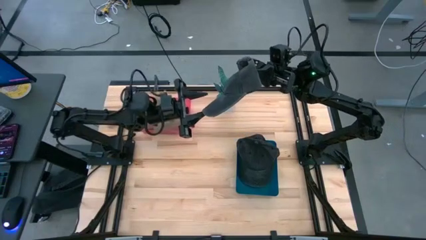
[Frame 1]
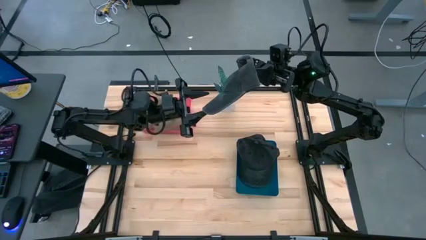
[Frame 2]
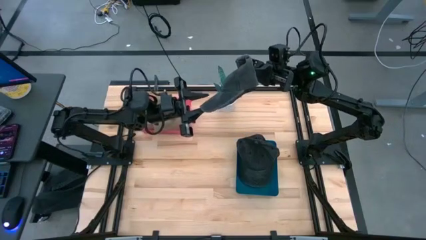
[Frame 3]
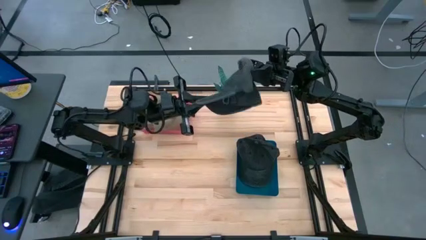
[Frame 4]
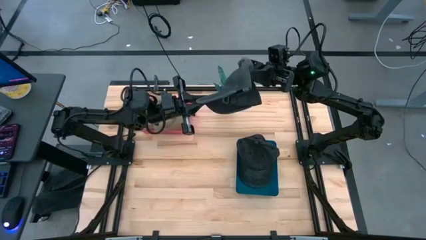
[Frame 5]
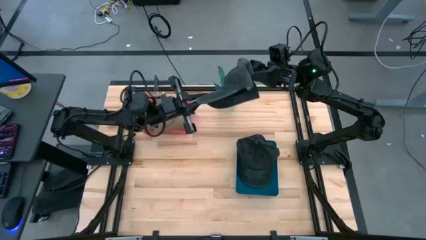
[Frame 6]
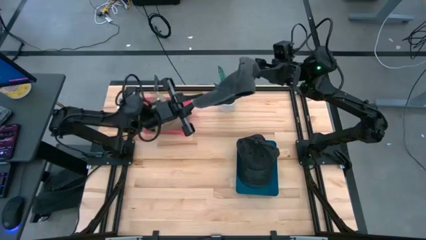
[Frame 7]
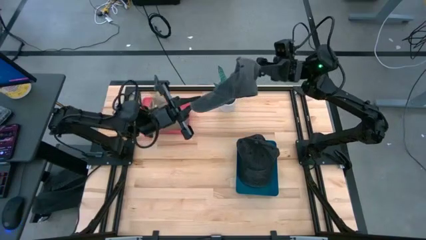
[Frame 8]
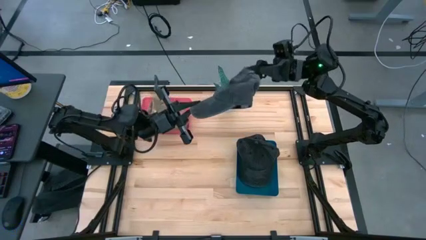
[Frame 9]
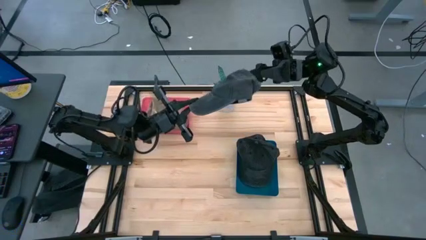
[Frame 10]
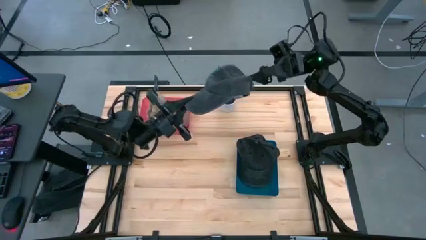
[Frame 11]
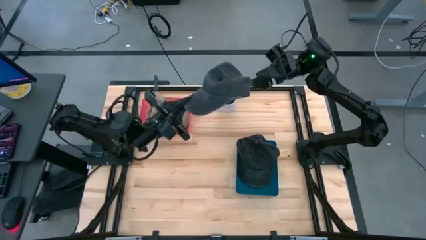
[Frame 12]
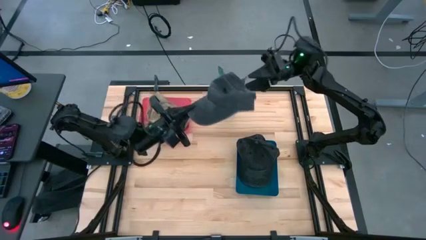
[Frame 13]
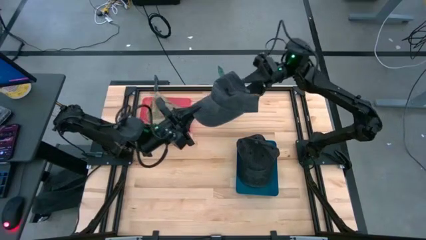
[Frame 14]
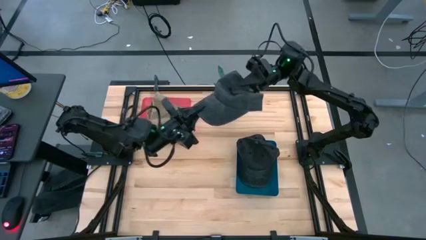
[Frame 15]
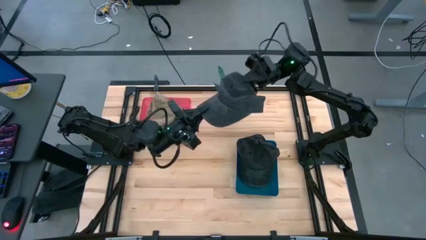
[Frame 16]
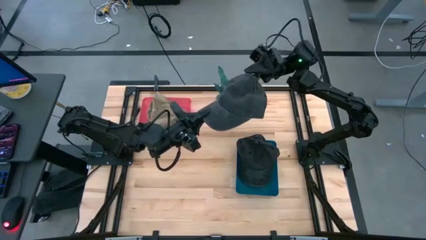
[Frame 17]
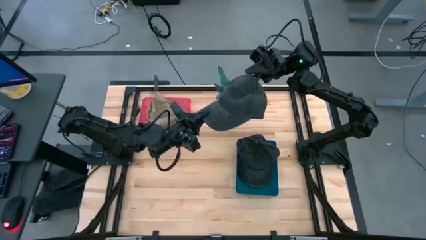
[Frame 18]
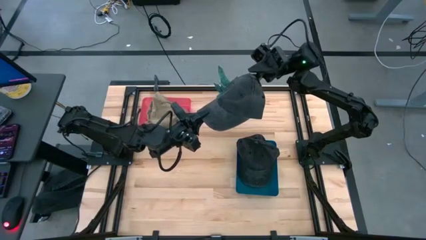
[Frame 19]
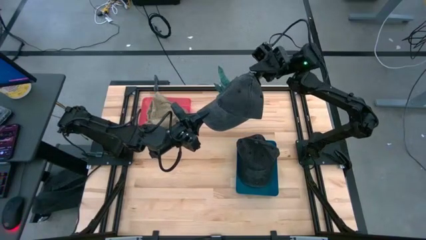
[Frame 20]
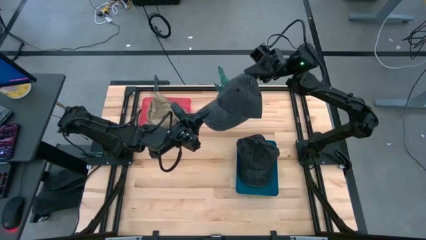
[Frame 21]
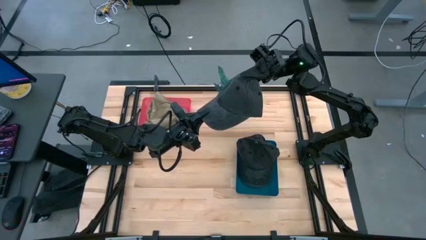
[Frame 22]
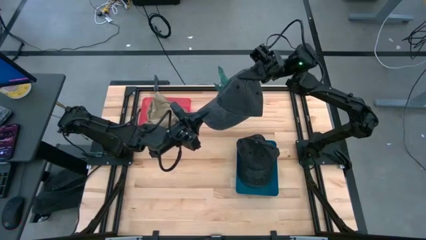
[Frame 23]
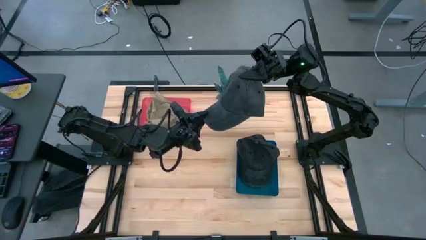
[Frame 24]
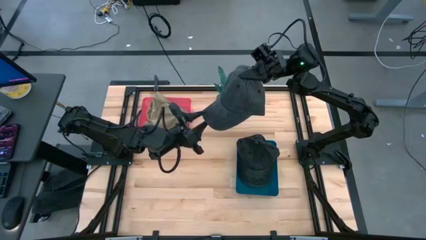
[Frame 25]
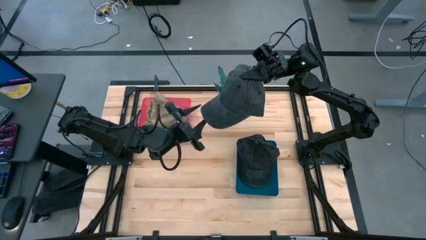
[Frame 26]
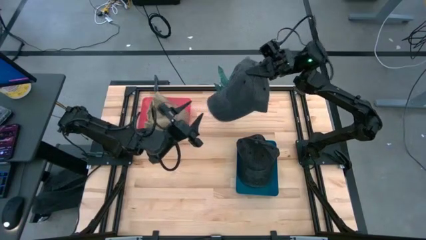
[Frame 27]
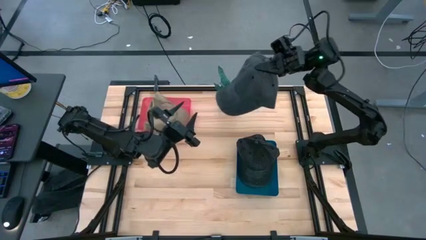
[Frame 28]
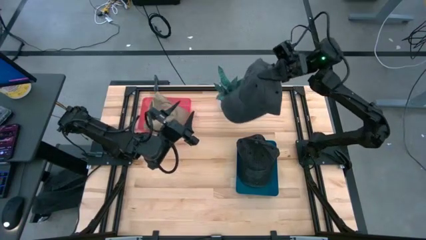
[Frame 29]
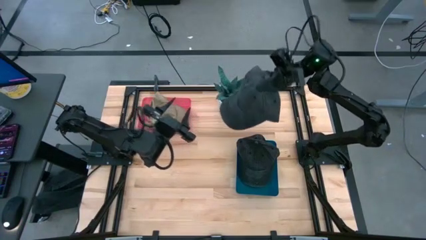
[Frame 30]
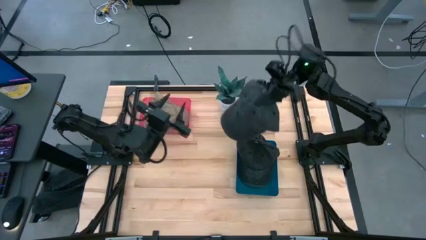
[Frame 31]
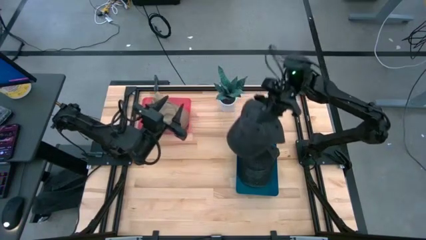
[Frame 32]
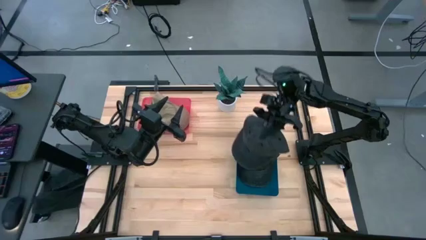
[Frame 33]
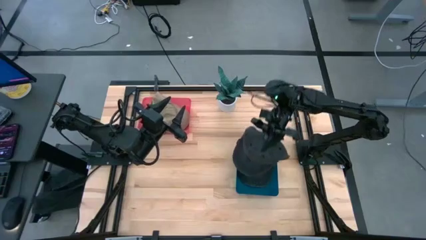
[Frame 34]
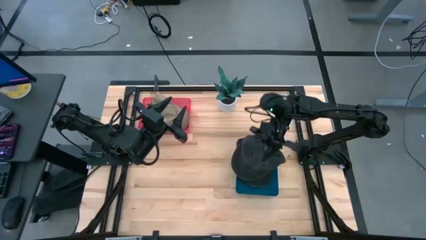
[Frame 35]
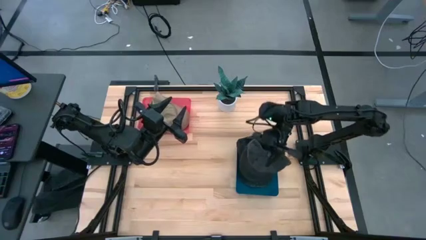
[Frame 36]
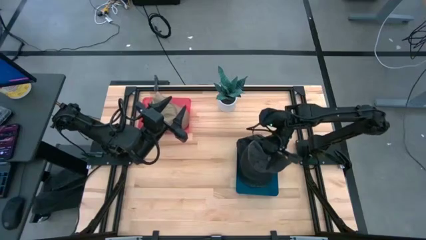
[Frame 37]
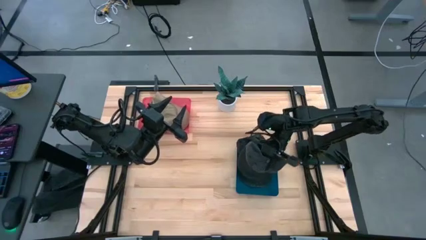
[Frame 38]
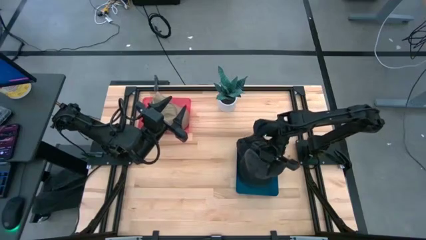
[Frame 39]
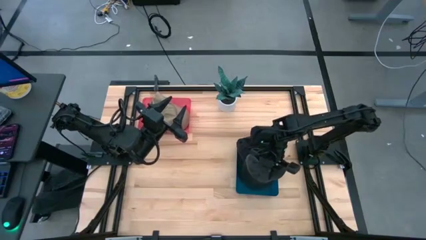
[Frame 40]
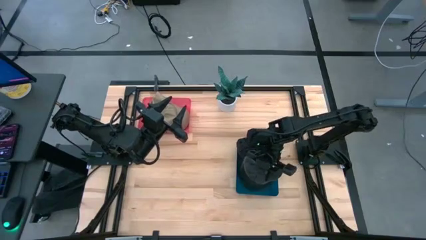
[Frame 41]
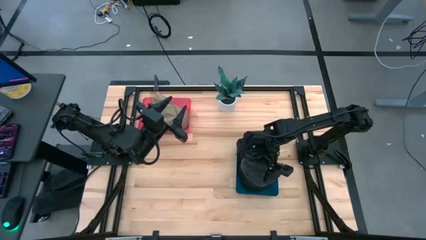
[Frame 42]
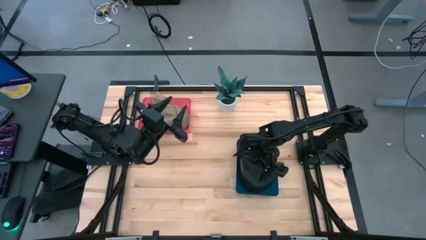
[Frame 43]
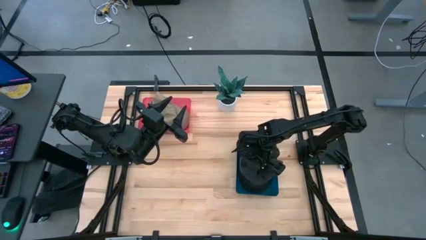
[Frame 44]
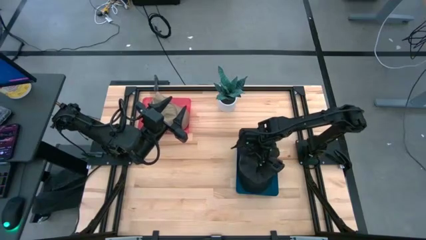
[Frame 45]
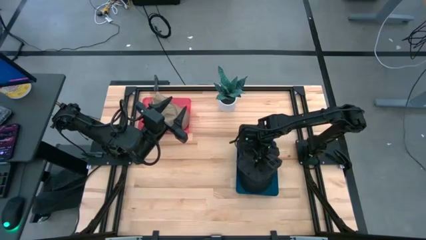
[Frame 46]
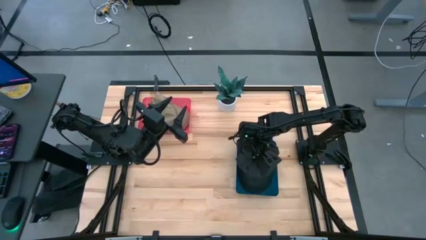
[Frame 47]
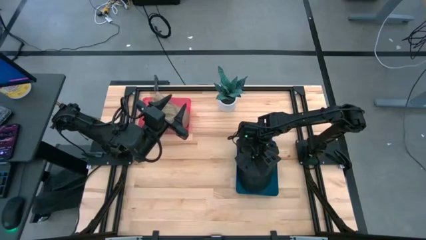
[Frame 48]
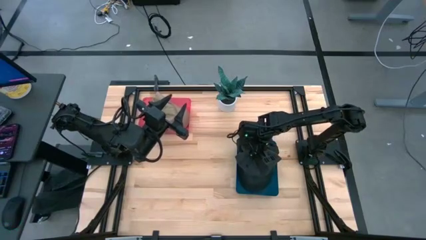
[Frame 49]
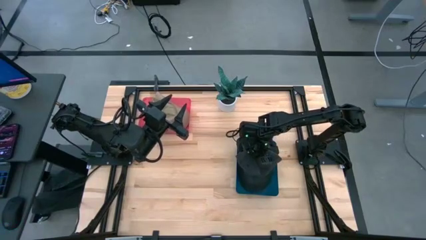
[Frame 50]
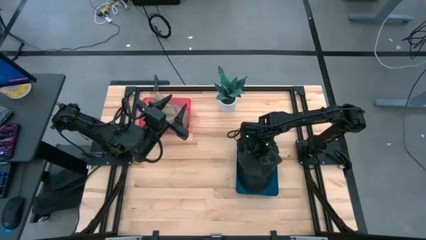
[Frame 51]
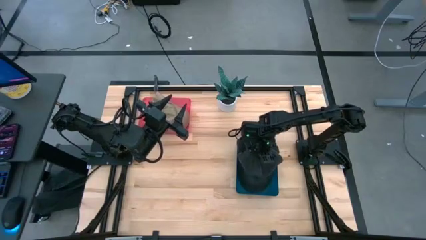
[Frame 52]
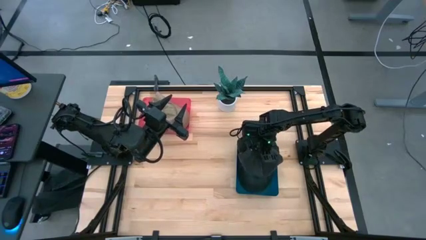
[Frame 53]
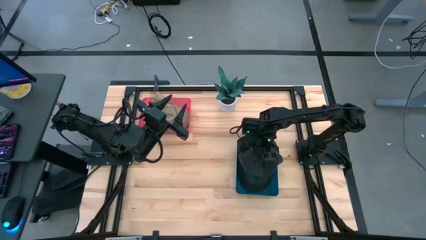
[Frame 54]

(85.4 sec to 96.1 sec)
Task: Pick & Place hat
Put the black cap into the blue bin
